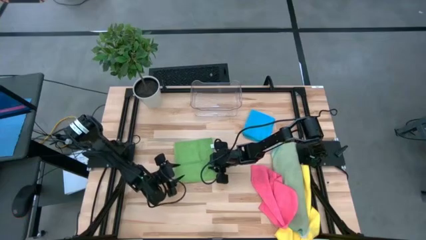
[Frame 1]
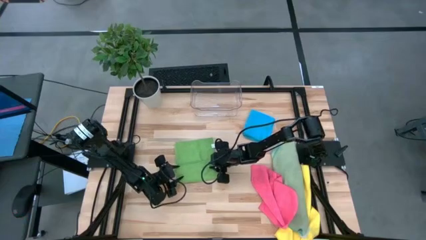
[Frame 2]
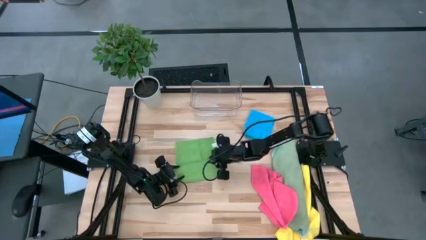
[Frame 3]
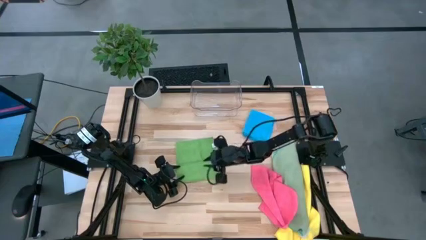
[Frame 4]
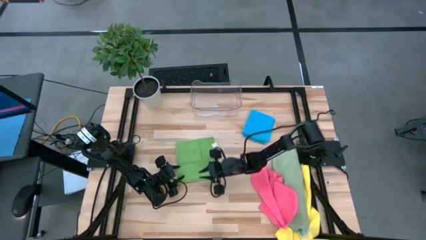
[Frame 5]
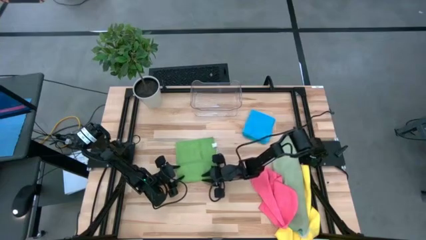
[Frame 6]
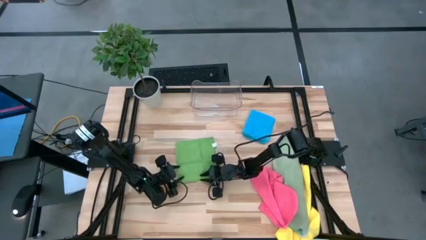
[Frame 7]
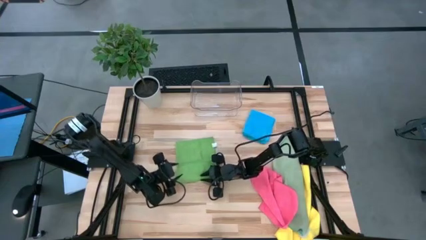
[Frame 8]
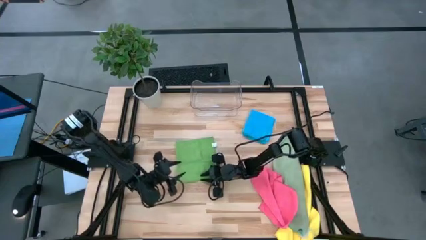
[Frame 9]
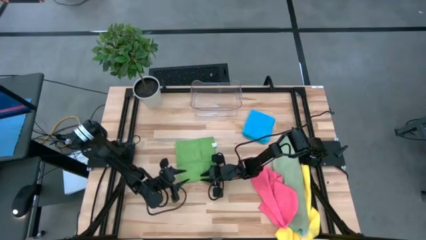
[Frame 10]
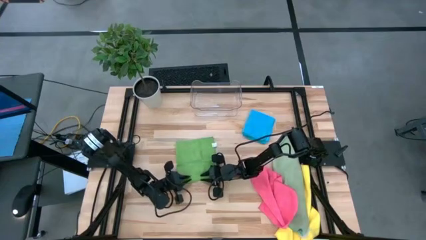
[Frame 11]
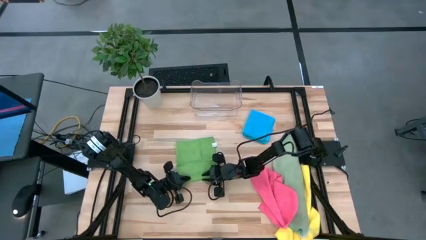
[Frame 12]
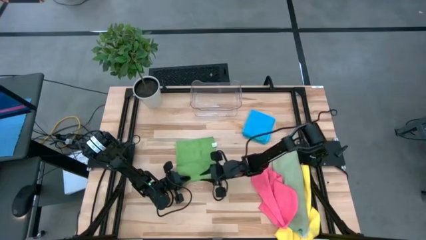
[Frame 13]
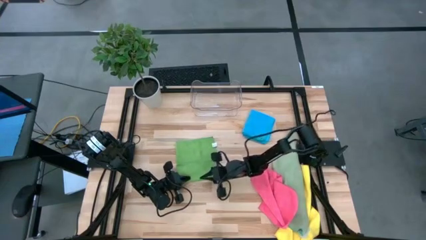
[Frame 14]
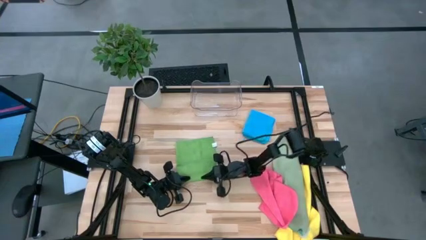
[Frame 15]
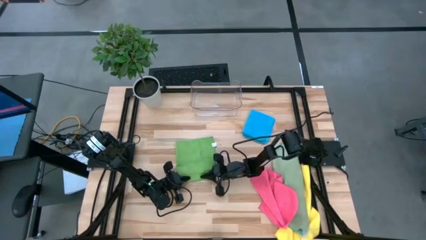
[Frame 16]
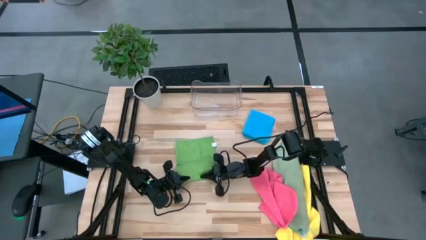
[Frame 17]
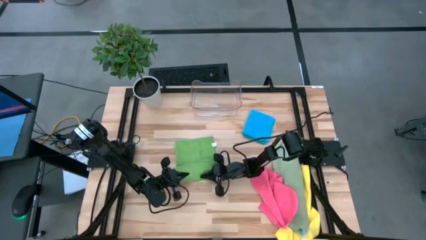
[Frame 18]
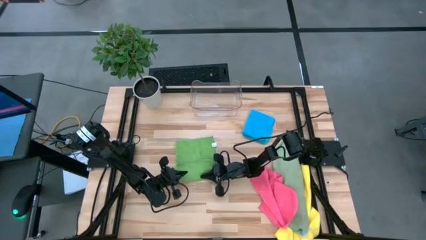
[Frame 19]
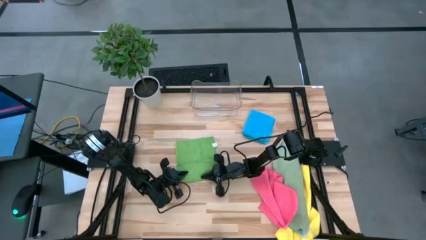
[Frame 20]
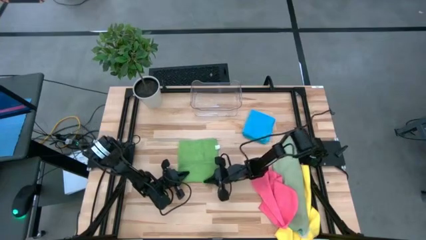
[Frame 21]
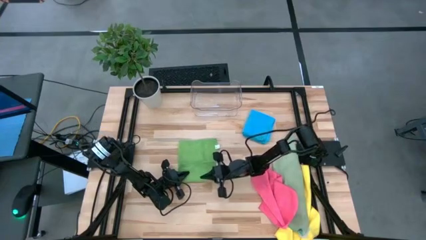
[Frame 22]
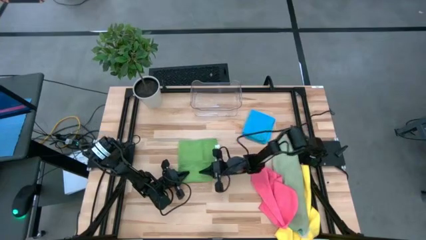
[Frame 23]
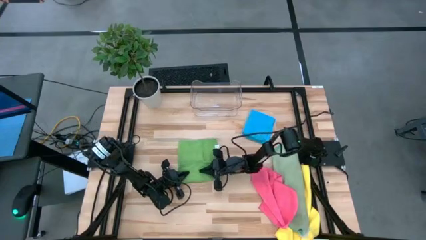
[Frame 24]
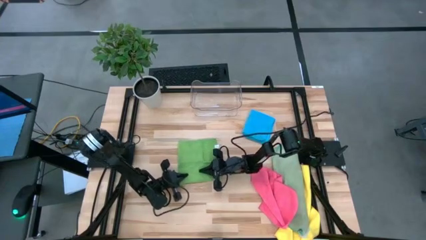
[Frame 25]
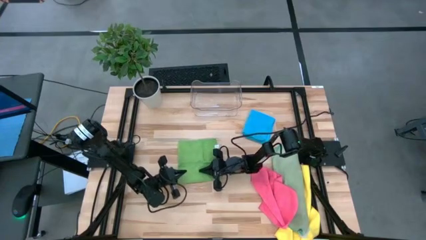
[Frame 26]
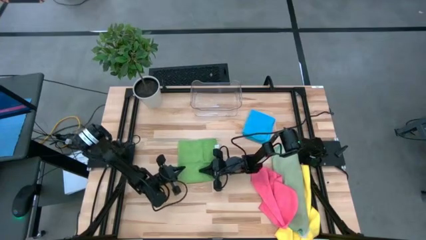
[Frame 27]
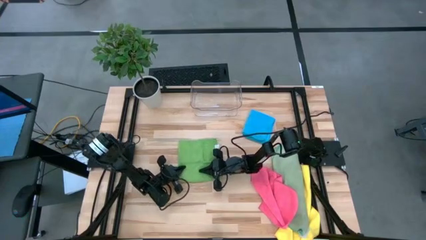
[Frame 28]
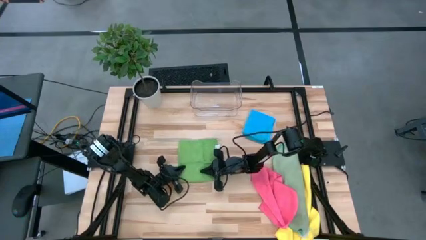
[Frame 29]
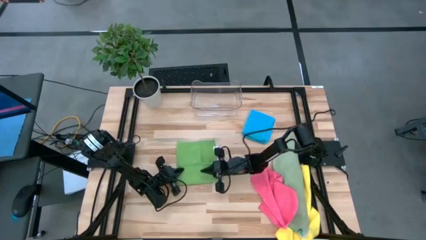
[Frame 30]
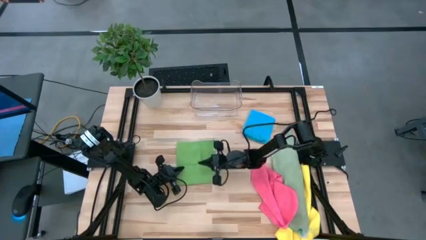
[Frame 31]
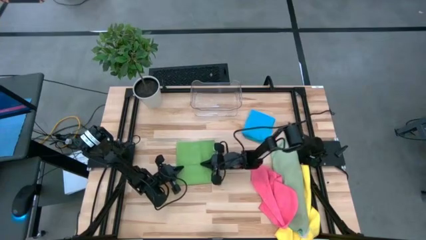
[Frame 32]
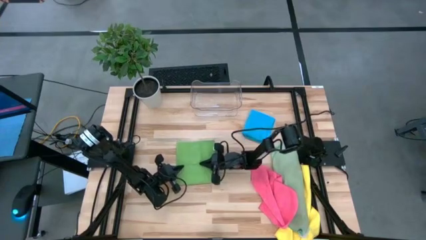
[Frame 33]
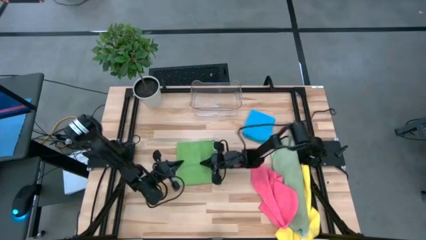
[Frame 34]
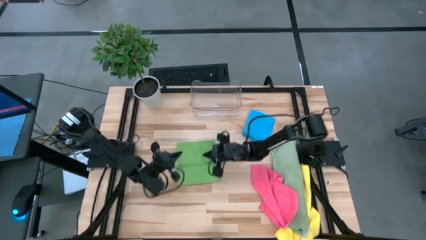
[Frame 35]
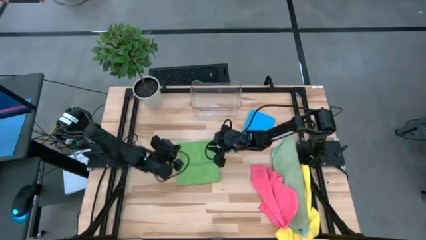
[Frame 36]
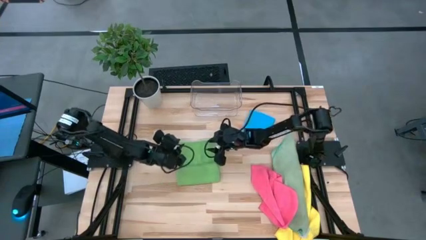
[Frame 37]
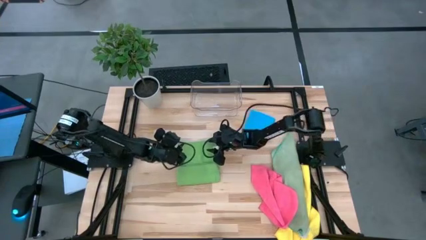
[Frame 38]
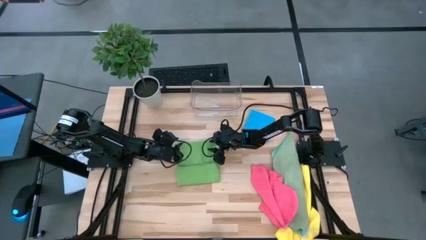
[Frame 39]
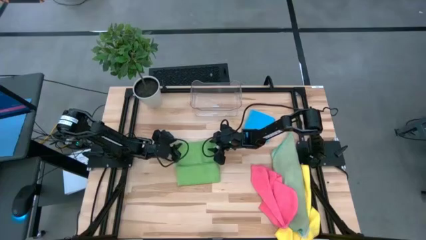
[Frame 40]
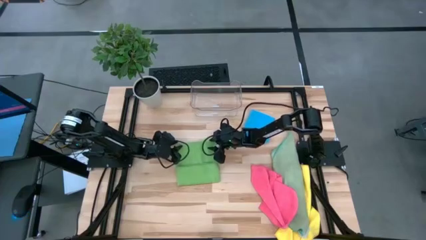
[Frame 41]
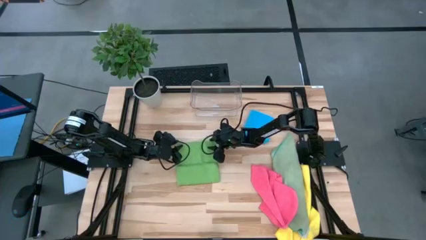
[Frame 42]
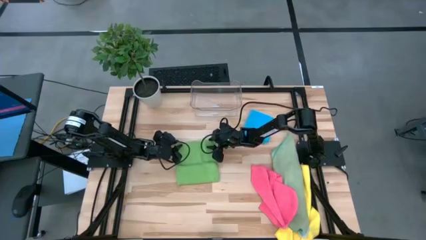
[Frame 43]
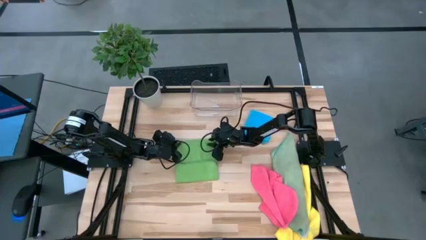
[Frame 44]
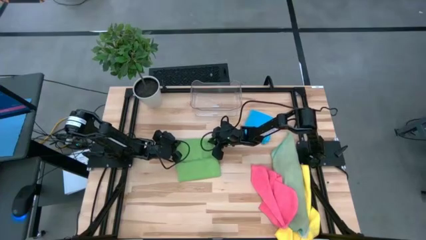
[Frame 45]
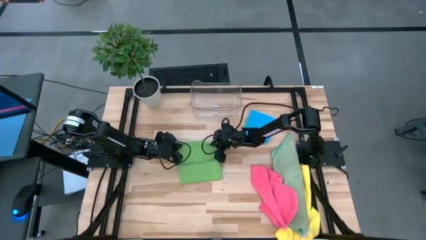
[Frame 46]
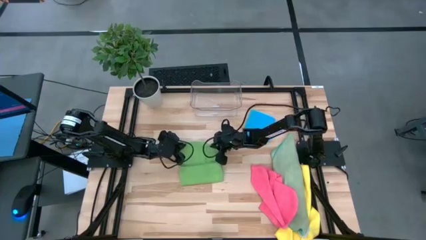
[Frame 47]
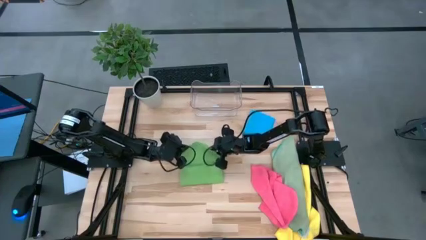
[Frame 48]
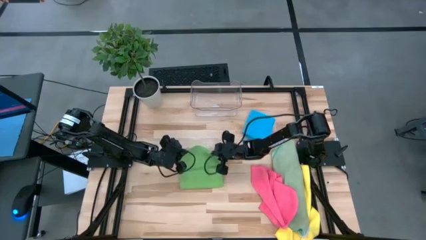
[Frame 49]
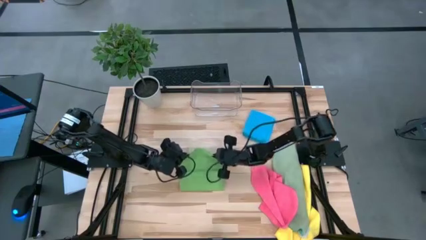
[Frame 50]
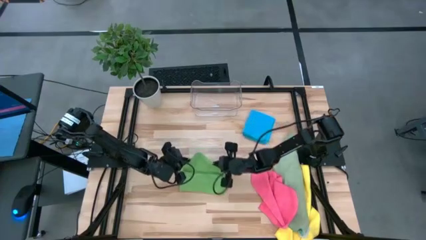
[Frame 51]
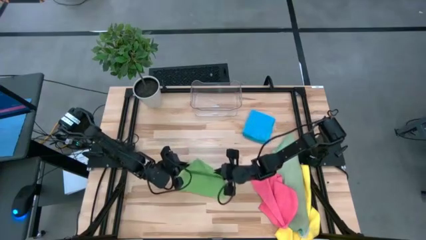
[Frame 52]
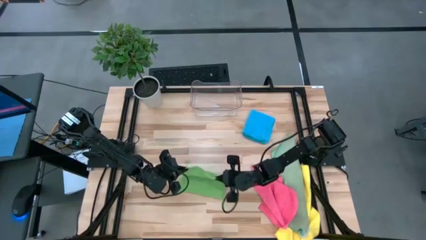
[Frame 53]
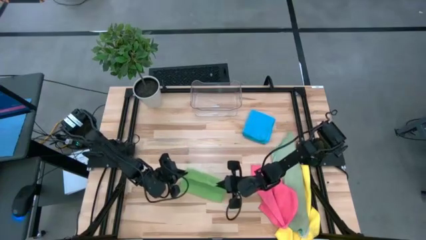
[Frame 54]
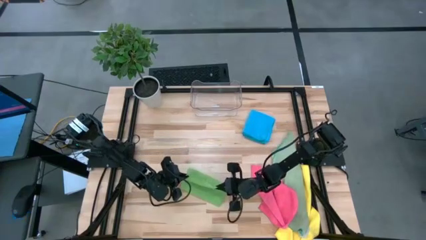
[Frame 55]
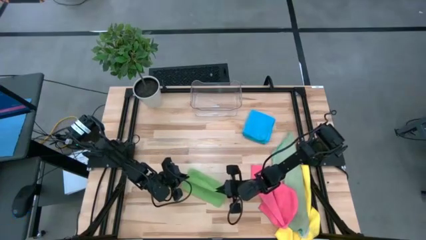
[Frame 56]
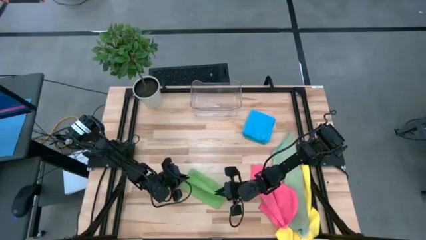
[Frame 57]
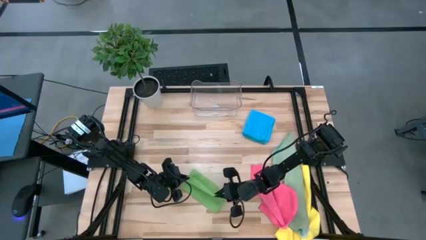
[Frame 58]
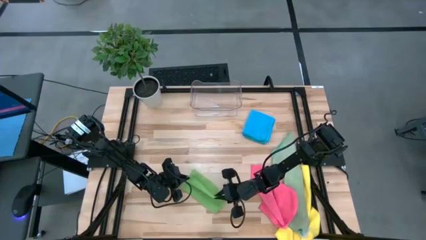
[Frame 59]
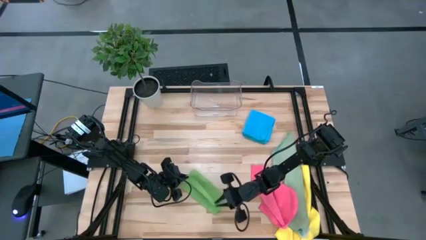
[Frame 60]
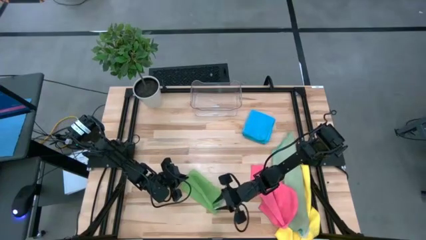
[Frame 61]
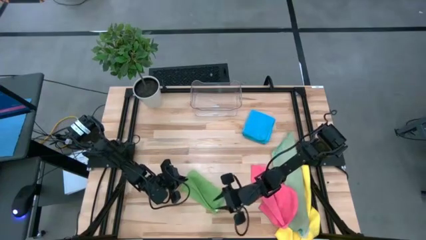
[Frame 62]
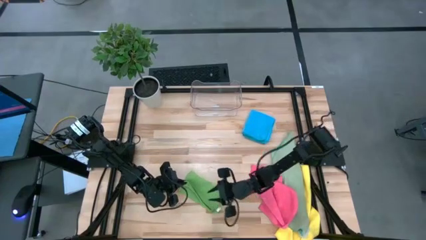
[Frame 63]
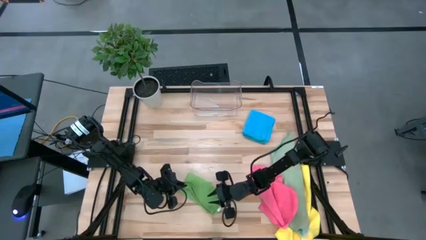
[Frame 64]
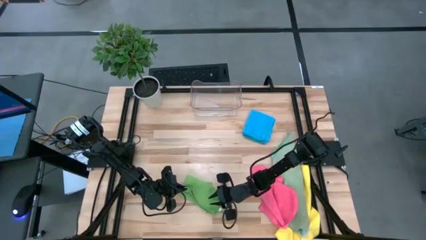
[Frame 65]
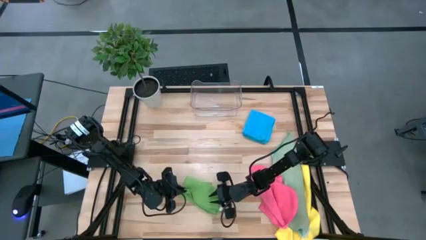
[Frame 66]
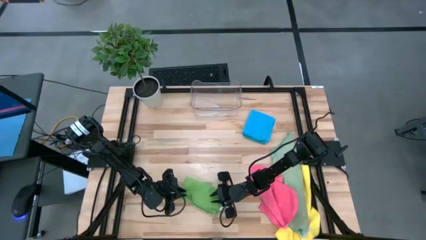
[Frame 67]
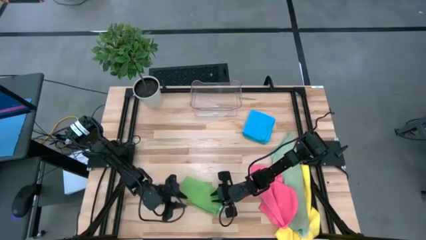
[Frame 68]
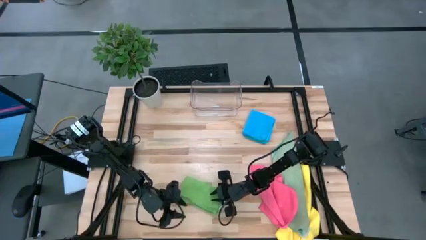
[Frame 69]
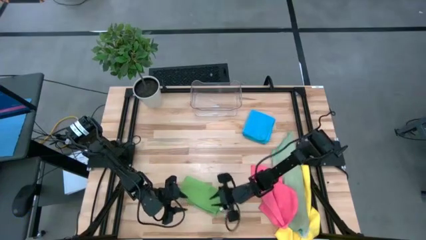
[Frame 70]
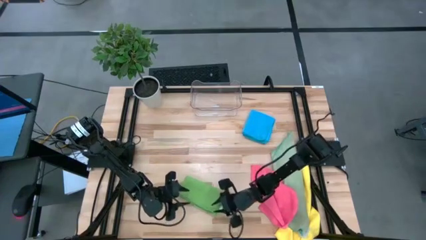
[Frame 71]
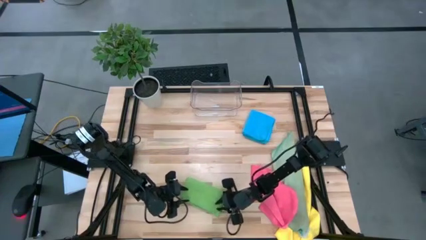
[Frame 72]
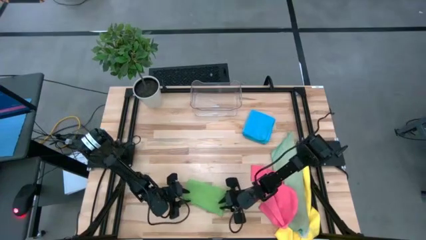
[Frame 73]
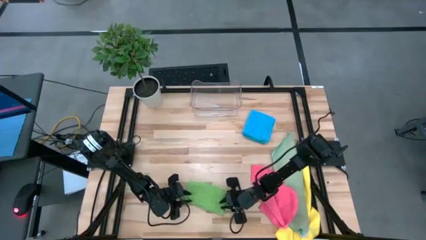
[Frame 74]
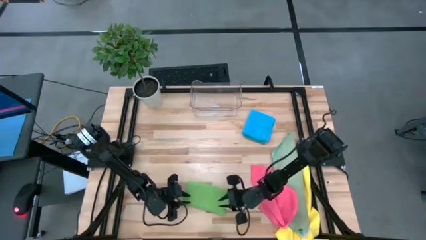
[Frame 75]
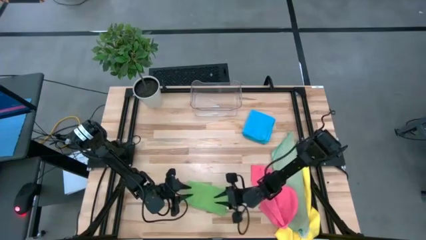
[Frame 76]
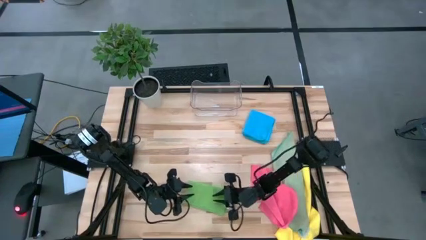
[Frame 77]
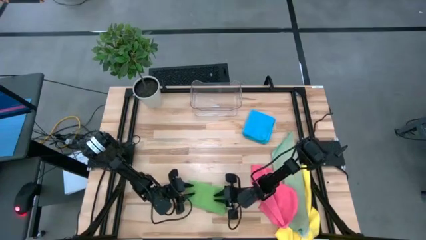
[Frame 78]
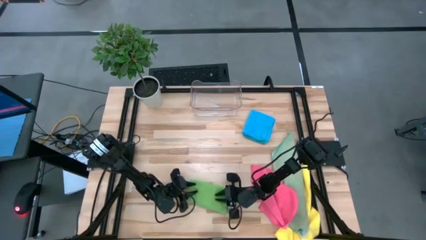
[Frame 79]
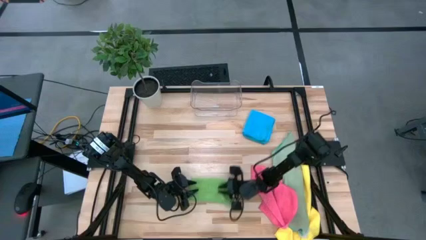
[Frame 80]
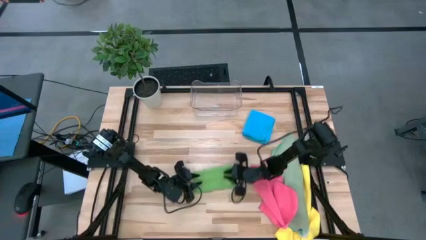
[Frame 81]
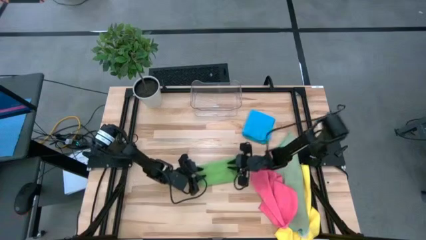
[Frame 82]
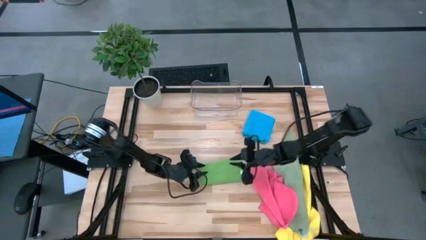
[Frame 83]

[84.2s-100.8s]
Task: Fold microfiber towels
Fold the green microfiber towel
